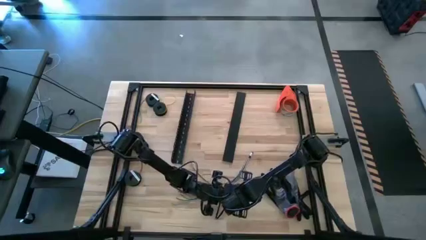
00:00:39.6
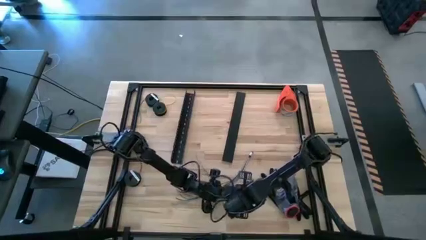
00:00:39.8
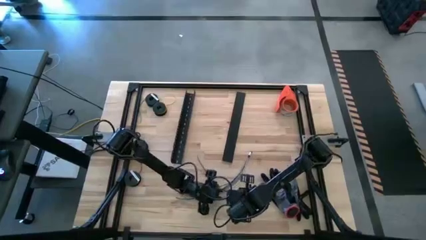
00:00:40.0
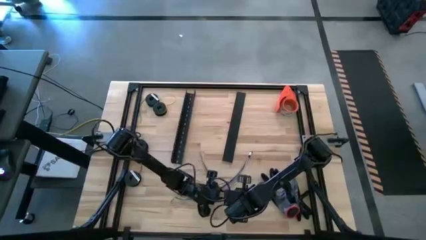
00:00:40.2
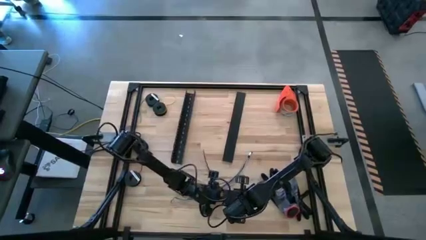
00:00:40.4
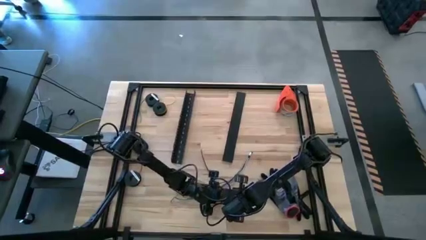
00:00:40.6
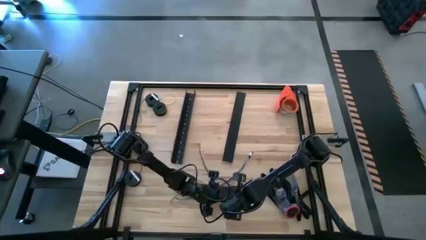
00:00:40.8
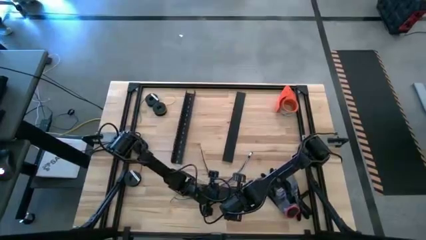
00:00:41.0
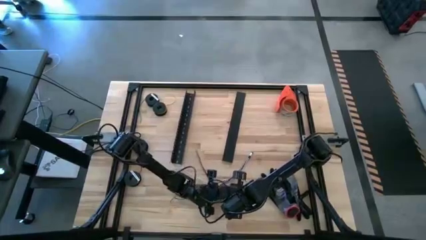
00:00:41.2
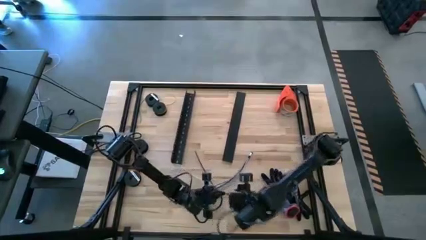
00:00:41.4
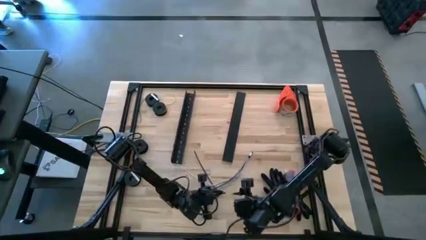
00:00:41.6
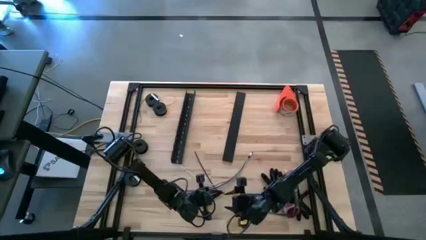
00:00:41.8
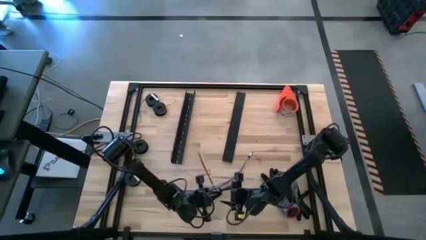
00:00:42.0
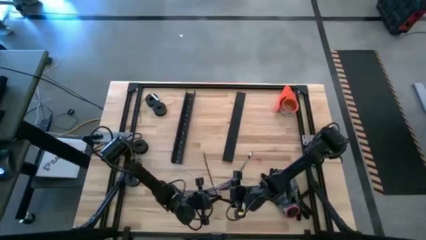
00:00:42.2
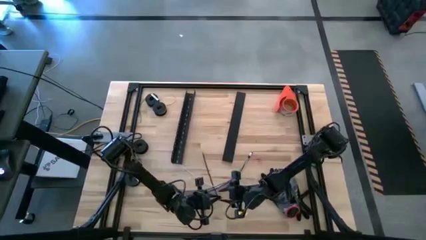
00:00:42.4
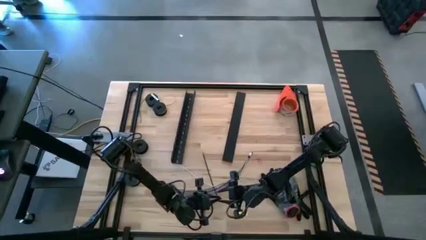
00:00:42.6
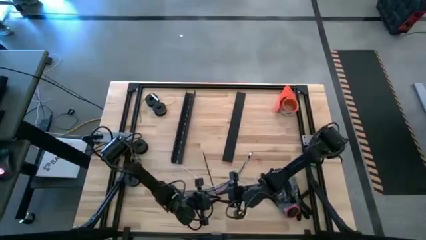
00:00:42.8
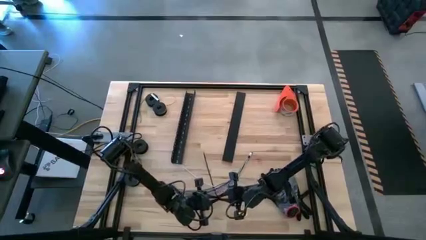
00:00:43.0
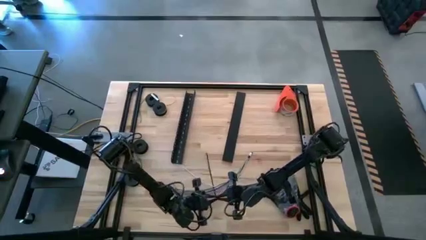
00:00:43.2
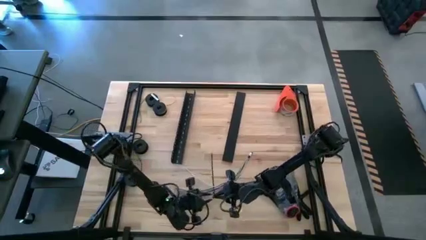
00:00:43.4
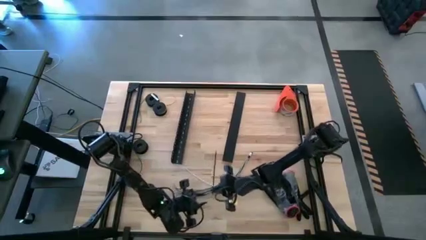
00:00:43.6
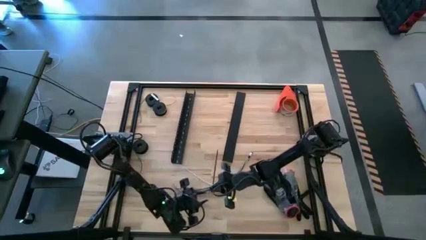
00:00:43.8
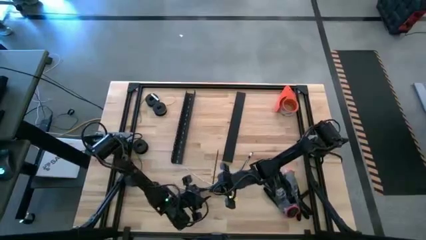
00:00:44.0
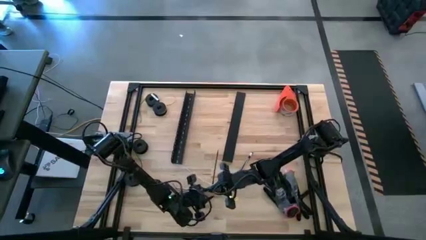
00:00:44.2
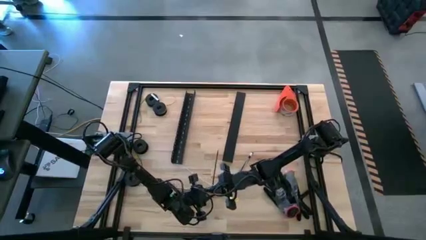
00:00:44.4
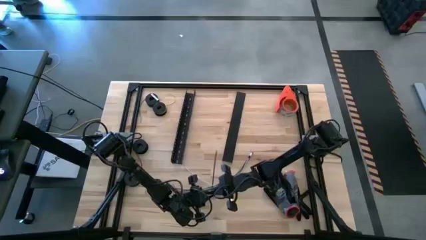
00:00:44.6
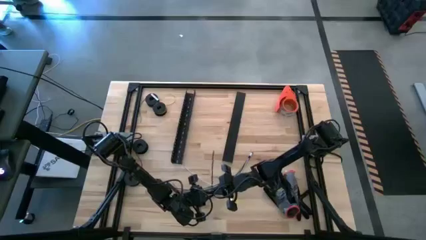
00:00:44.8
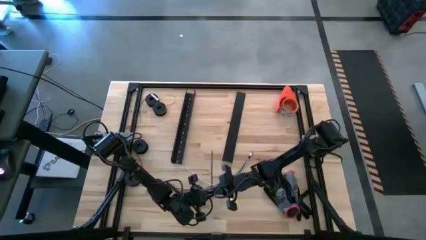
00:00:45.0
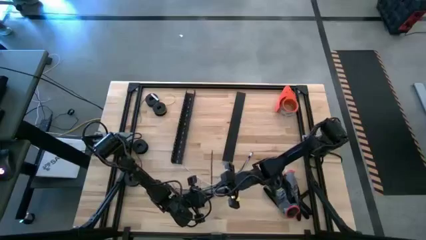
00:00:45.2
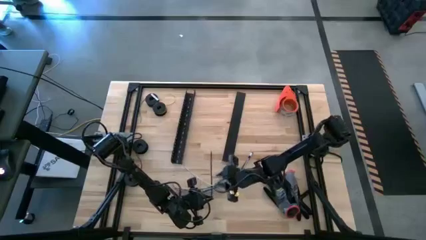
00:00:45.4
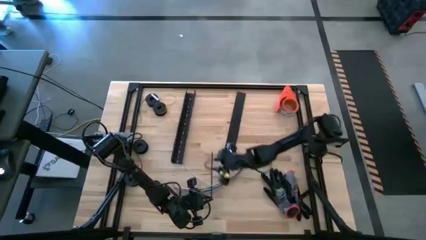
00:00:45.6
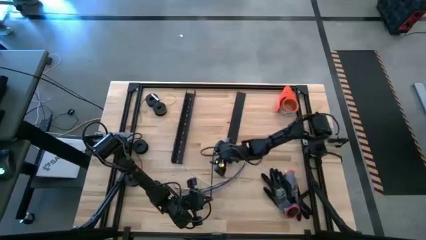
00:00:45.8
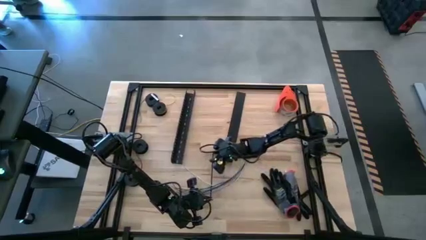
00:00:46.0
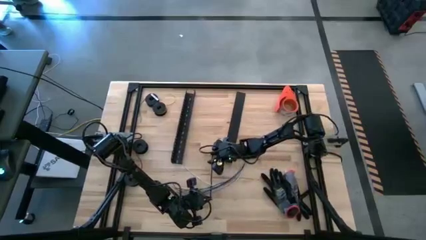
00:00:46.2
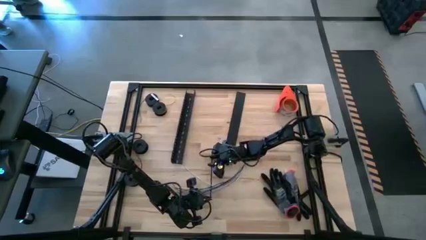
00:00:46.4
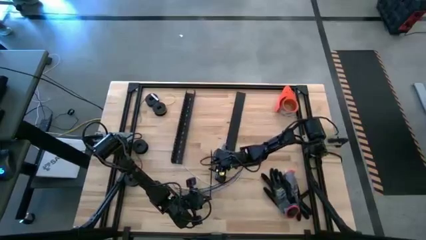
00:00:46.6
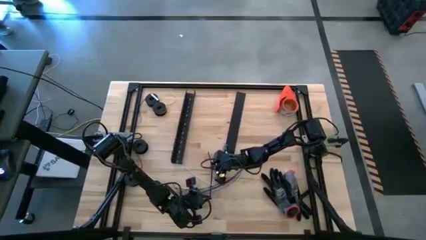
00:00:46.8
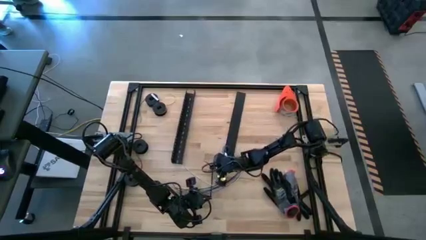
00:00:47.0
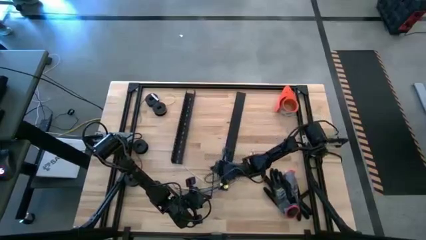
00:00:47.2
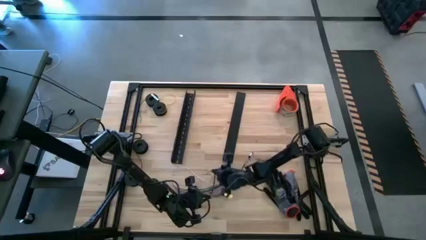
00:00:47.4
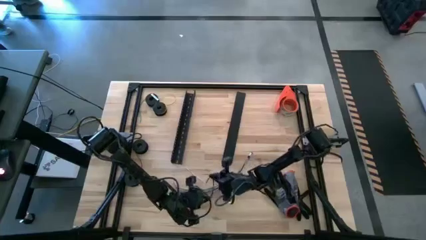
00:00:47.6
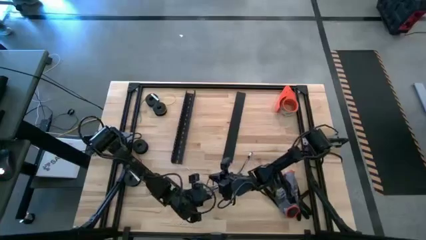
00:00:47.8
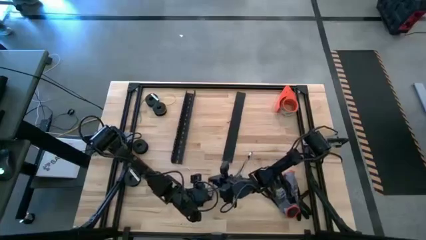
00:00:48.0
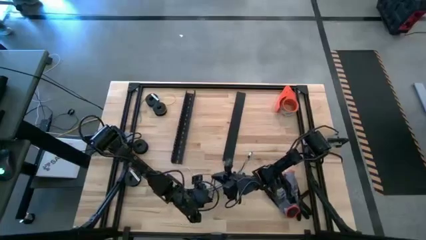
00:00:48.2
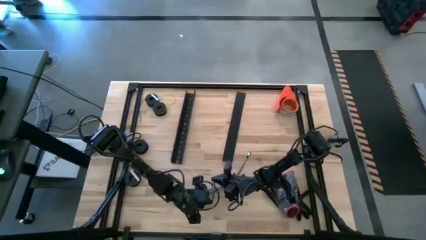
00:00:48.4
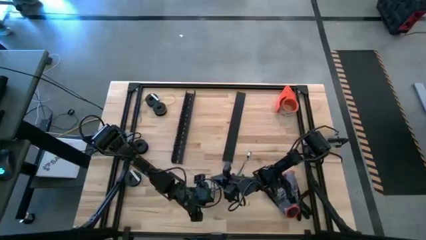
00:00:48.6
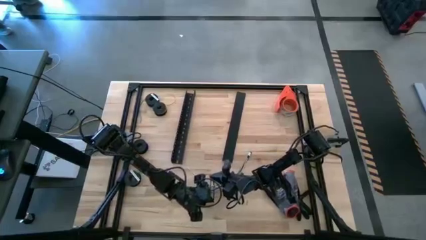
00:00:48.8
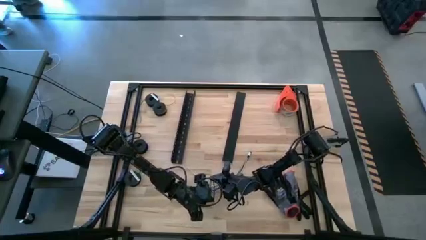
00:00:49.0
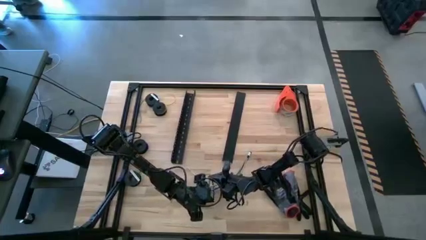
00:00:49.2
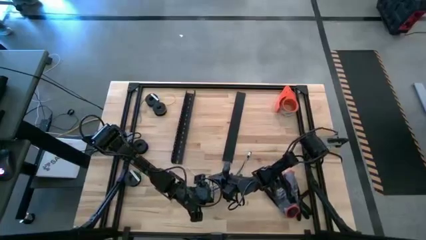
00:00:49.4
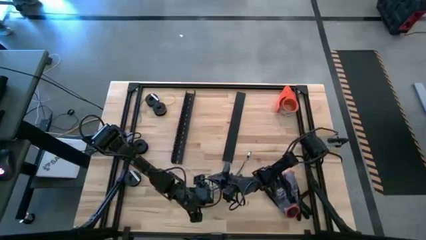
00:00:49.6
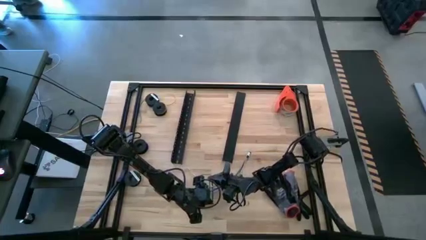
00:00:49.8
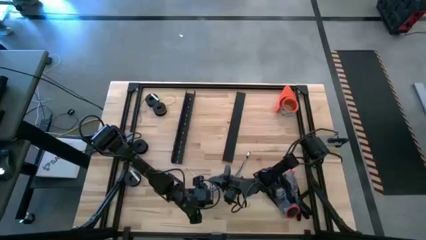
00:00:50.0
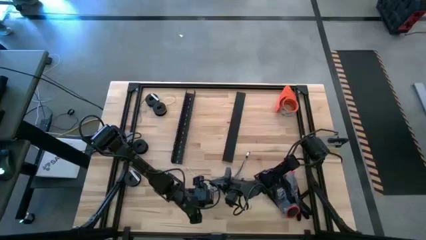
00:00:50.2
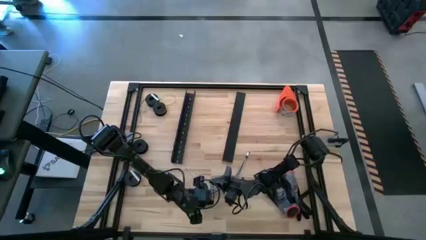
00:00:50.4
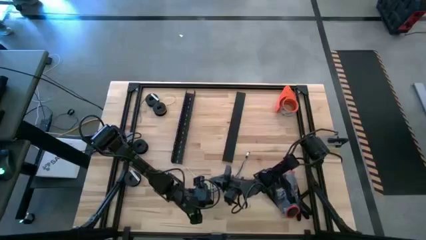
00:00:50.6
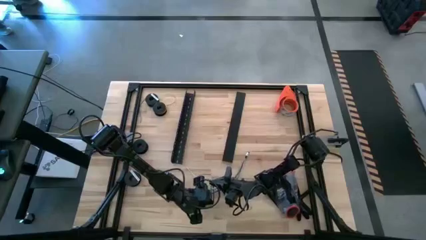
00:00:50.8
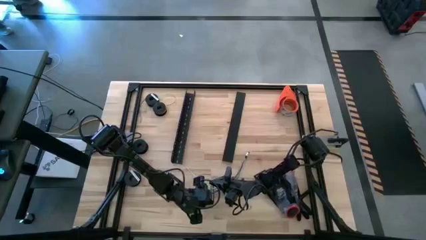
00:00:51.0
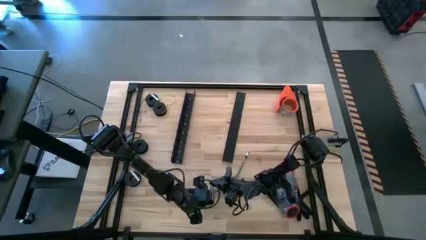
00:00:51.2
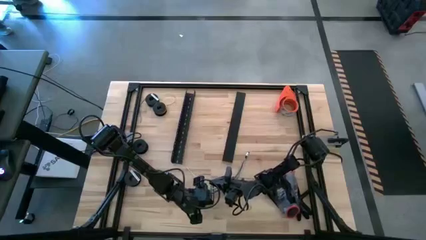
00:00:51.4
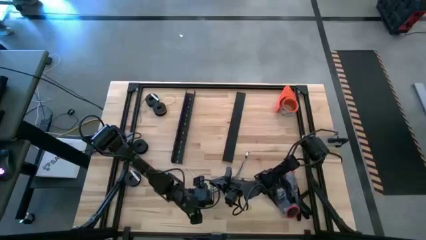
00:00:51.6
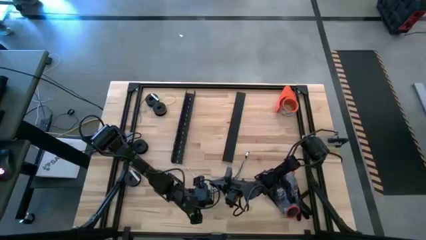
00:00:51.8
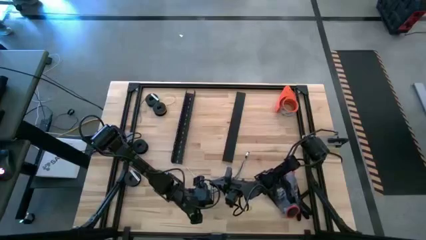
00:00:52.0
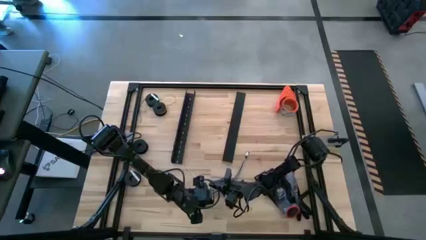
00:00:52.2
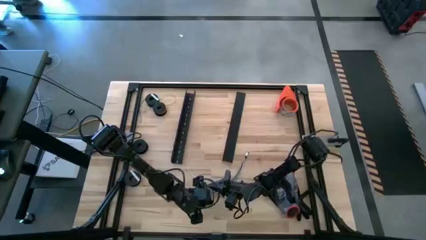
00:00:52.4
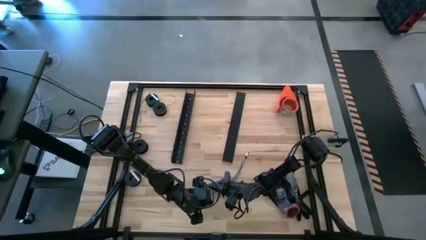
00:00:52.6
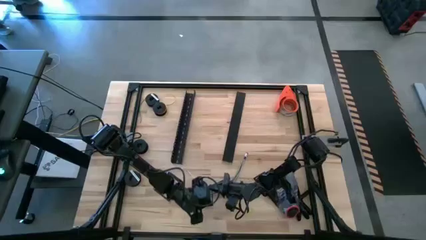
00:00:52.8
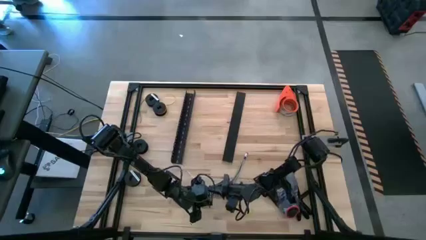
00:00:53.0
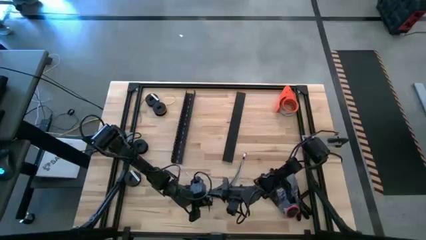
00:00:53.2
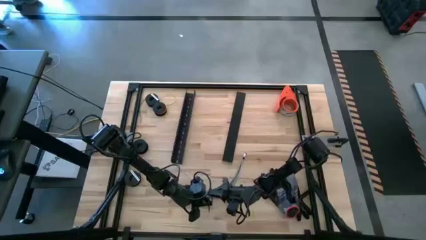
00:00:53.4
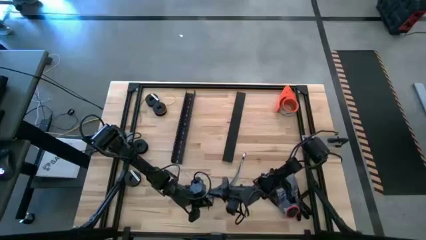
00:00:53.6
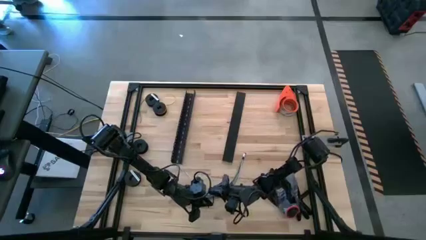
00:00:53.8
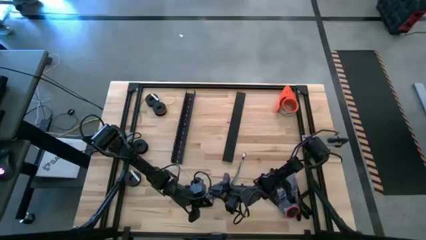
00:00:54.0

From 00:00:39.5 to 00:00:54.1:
Task: Ziptie cables
Wrap the cable wires using zip tie
